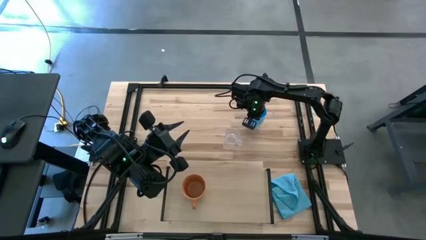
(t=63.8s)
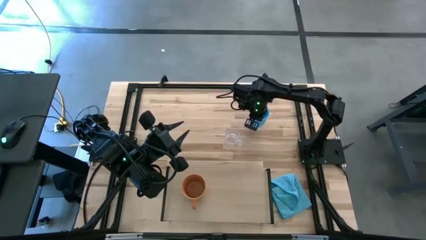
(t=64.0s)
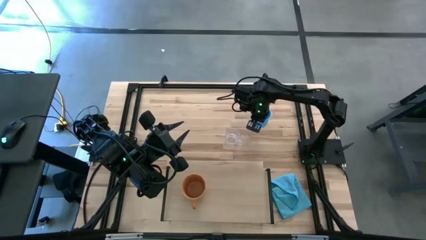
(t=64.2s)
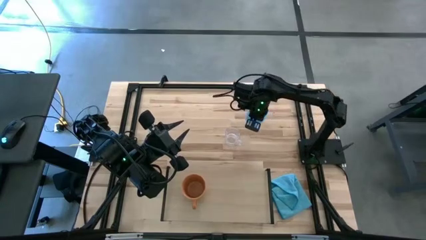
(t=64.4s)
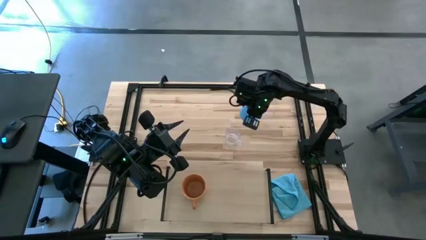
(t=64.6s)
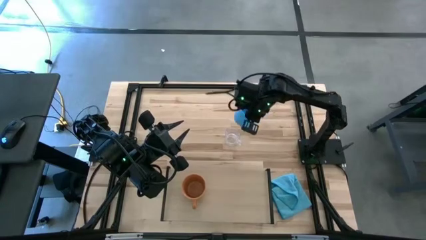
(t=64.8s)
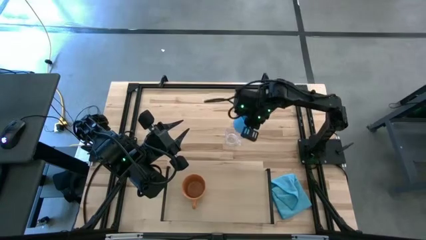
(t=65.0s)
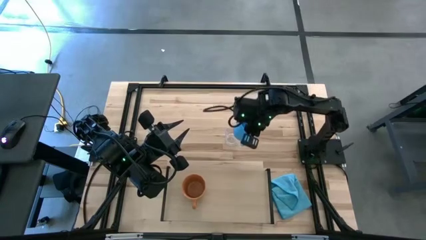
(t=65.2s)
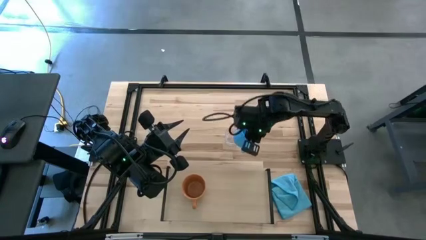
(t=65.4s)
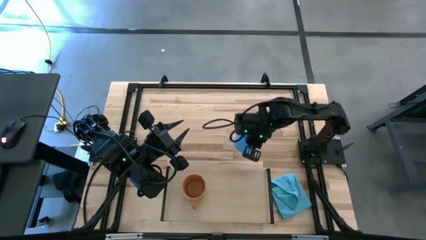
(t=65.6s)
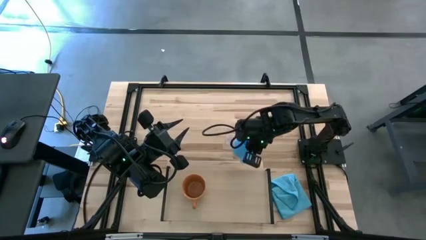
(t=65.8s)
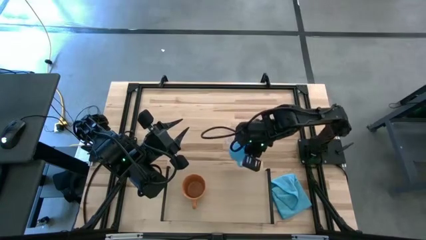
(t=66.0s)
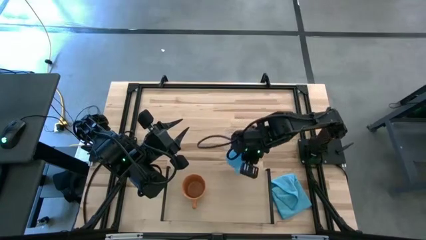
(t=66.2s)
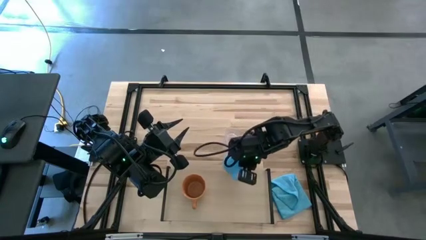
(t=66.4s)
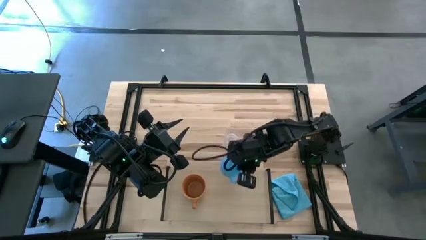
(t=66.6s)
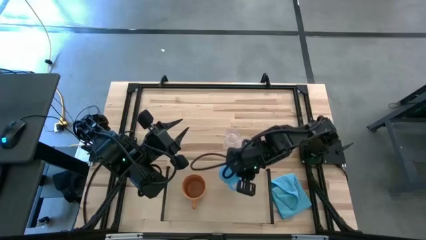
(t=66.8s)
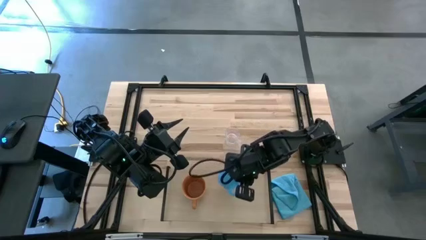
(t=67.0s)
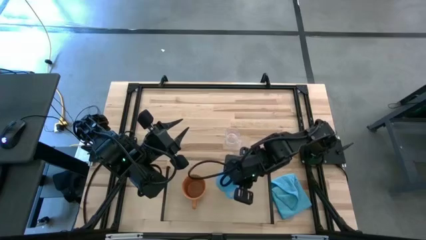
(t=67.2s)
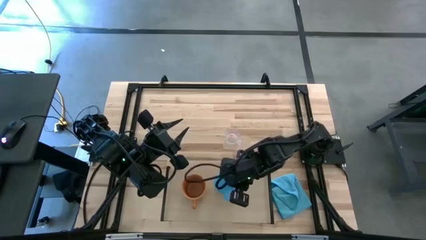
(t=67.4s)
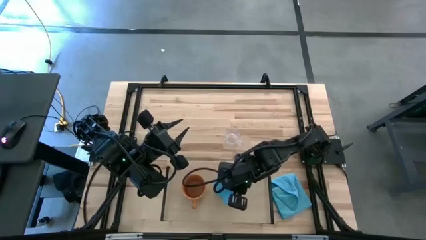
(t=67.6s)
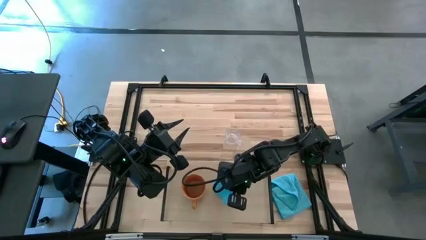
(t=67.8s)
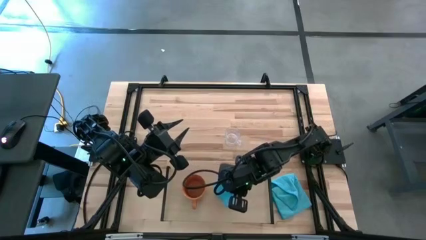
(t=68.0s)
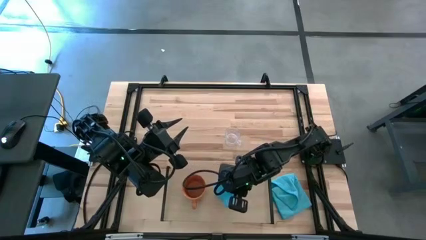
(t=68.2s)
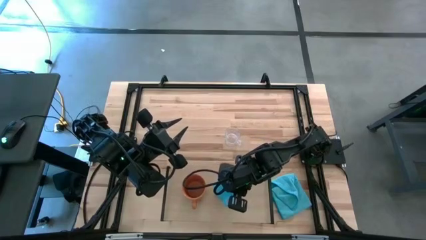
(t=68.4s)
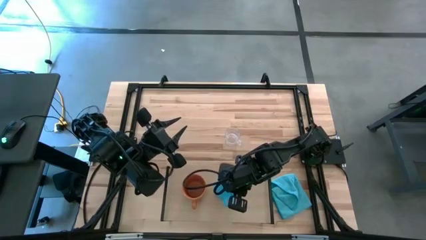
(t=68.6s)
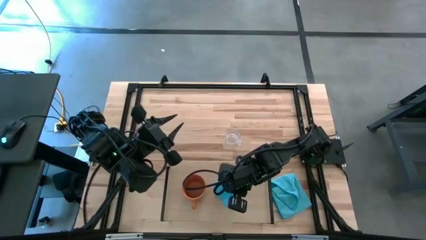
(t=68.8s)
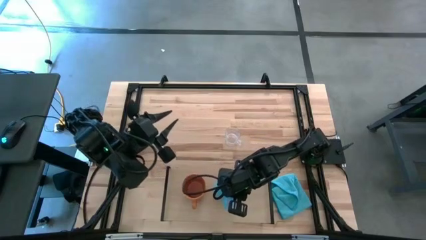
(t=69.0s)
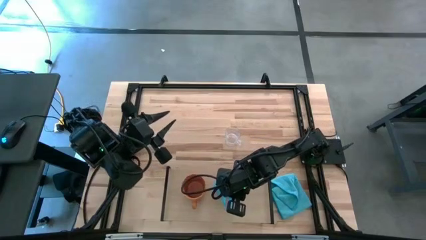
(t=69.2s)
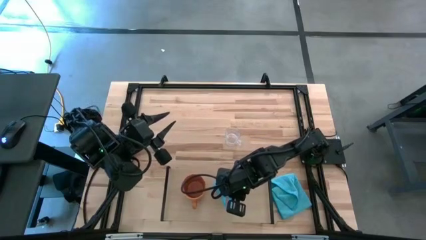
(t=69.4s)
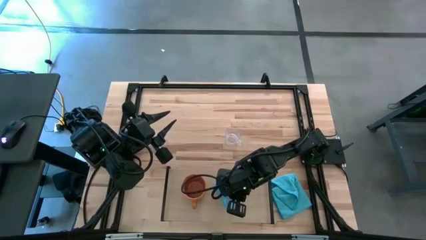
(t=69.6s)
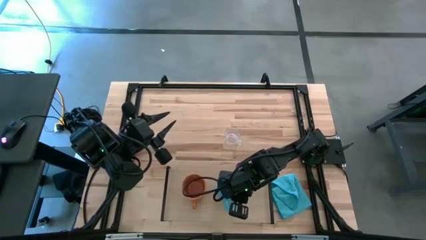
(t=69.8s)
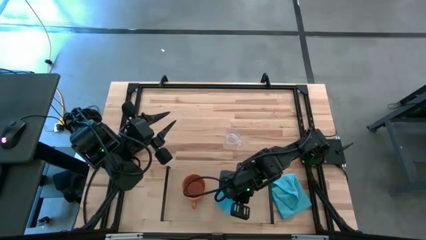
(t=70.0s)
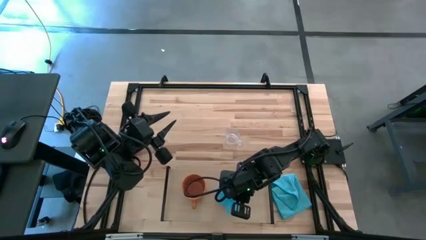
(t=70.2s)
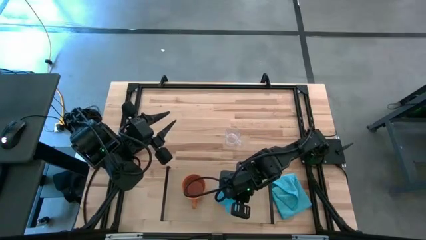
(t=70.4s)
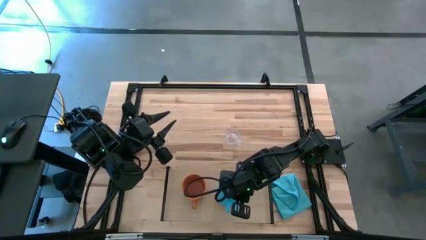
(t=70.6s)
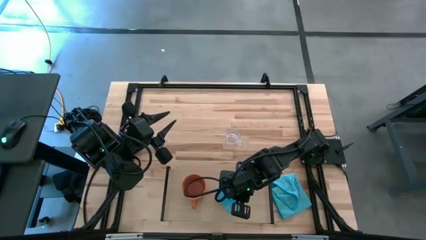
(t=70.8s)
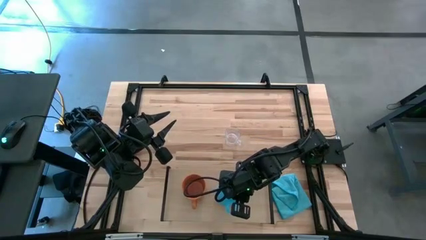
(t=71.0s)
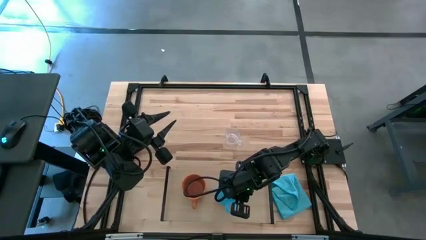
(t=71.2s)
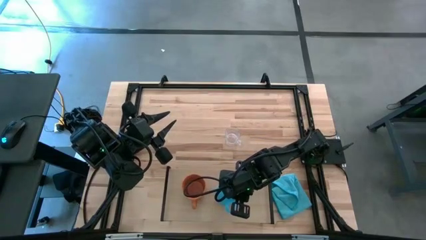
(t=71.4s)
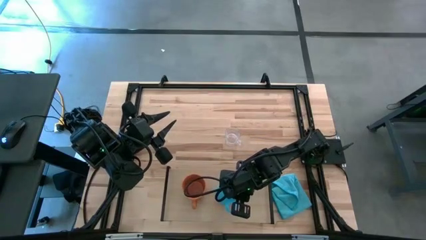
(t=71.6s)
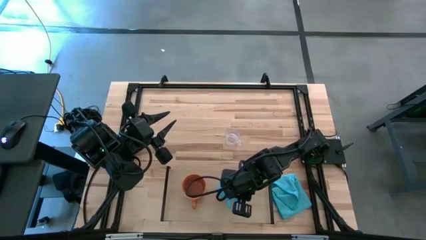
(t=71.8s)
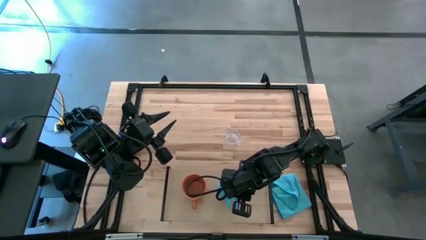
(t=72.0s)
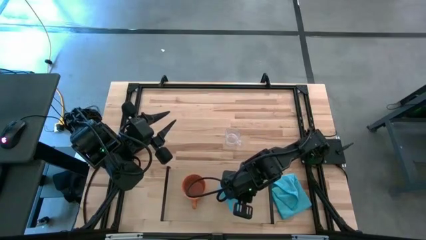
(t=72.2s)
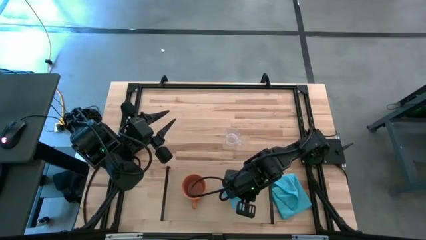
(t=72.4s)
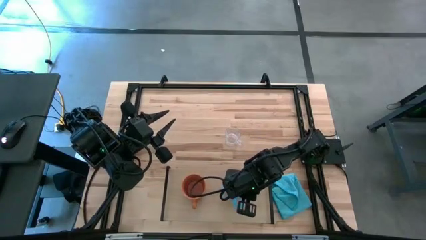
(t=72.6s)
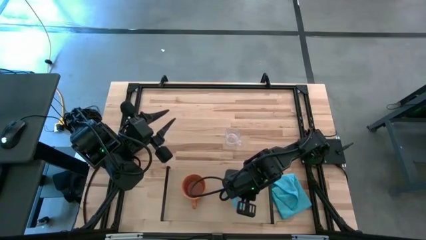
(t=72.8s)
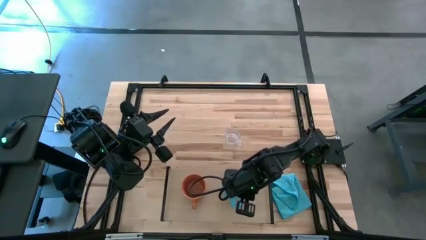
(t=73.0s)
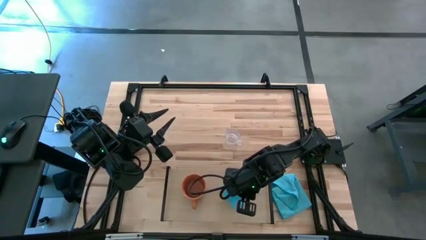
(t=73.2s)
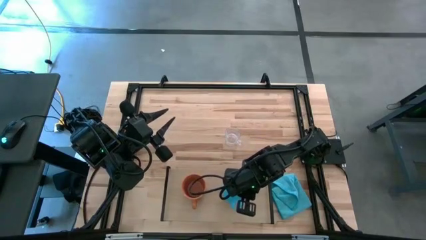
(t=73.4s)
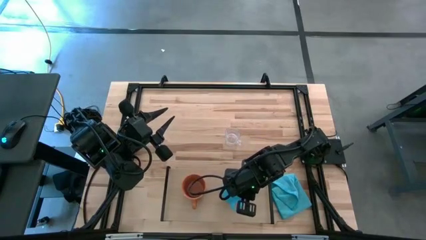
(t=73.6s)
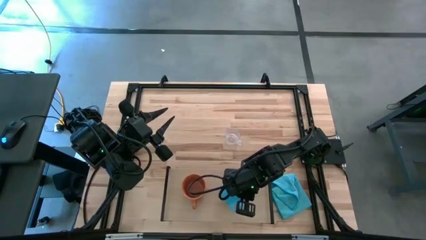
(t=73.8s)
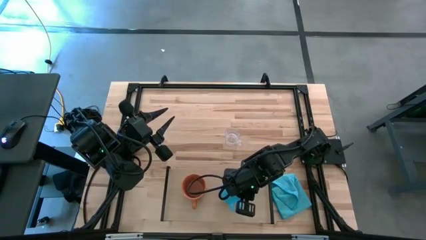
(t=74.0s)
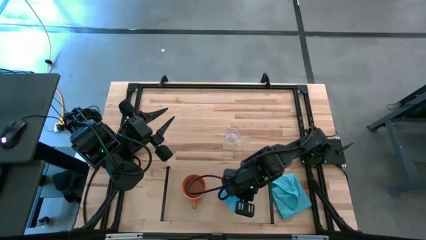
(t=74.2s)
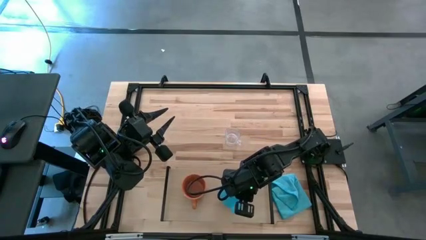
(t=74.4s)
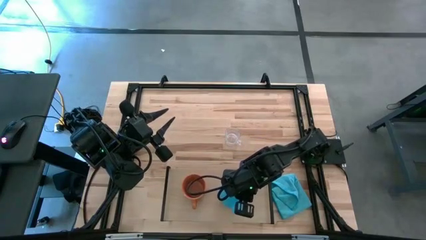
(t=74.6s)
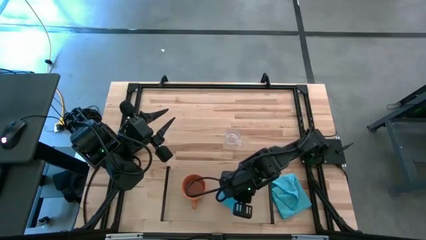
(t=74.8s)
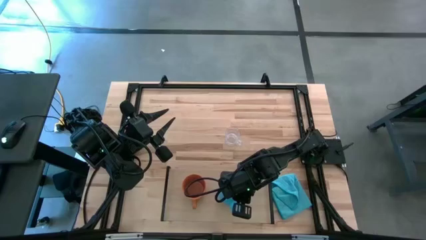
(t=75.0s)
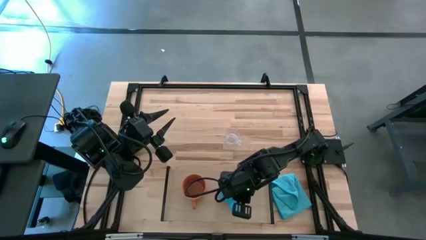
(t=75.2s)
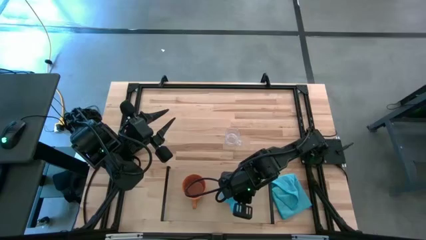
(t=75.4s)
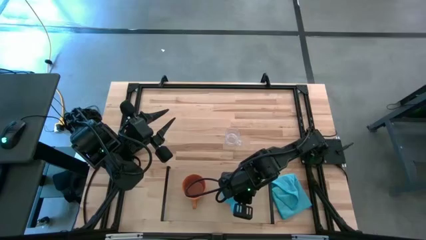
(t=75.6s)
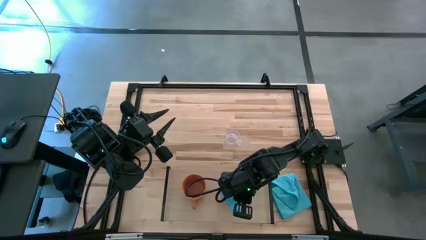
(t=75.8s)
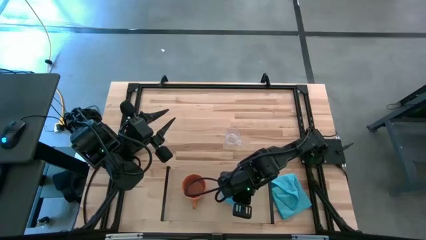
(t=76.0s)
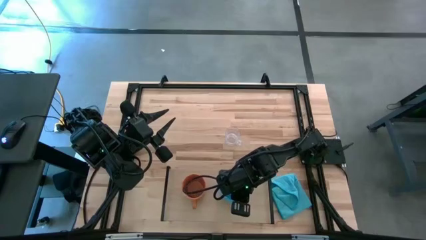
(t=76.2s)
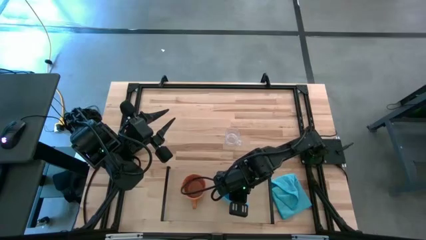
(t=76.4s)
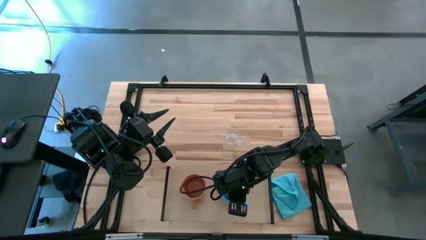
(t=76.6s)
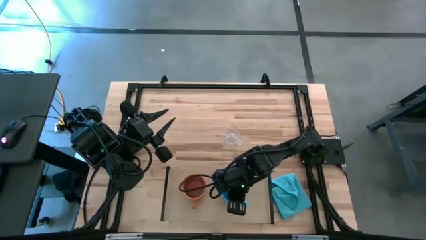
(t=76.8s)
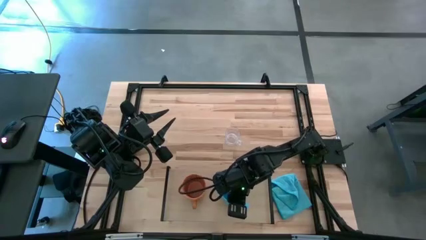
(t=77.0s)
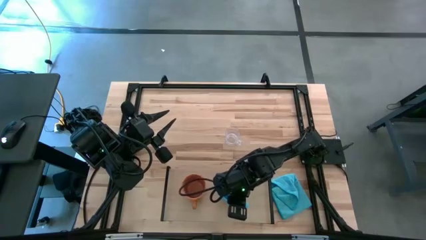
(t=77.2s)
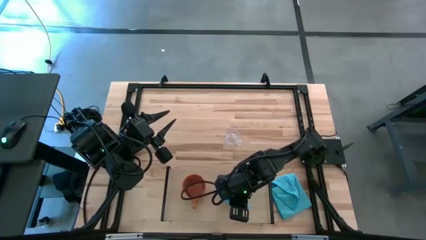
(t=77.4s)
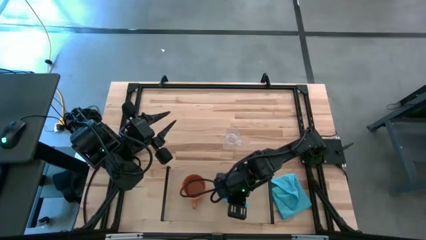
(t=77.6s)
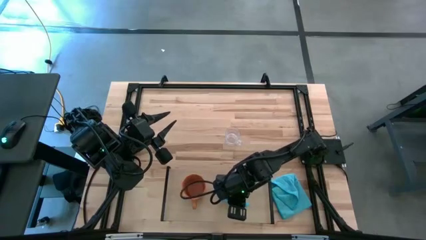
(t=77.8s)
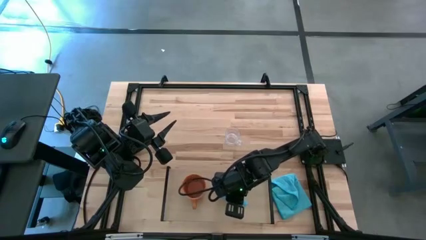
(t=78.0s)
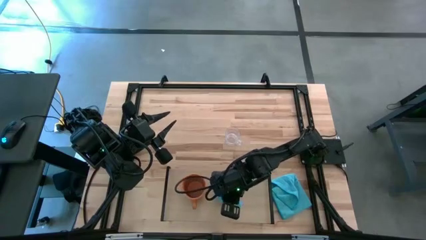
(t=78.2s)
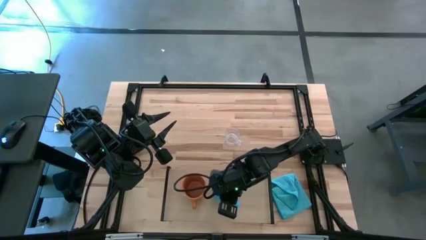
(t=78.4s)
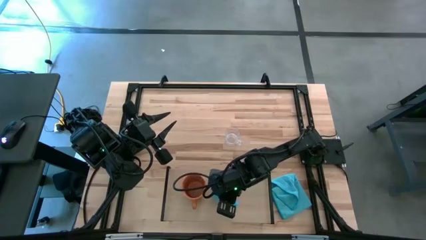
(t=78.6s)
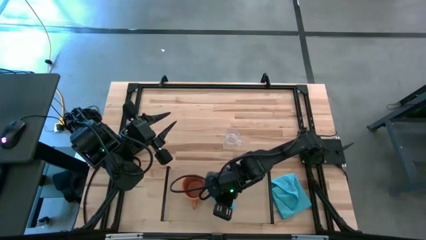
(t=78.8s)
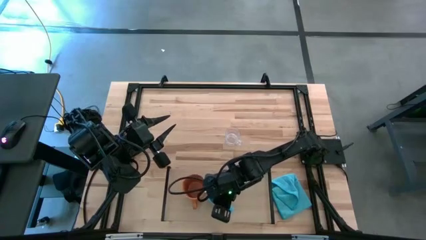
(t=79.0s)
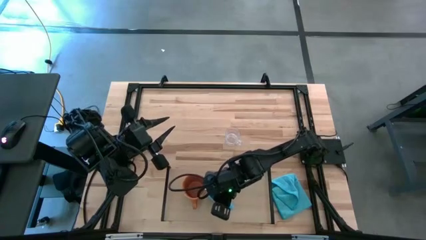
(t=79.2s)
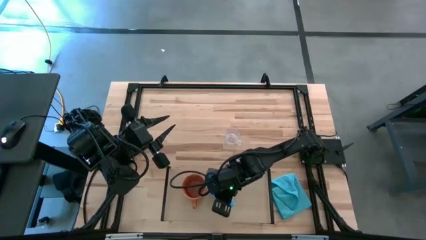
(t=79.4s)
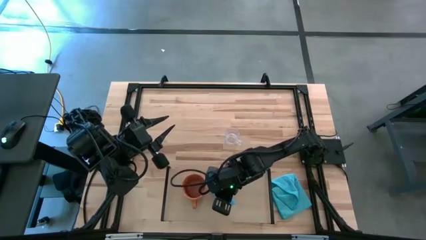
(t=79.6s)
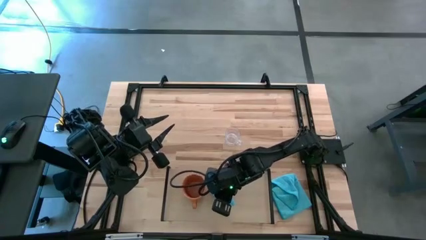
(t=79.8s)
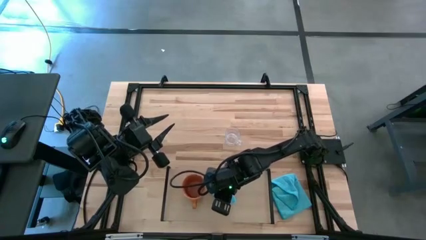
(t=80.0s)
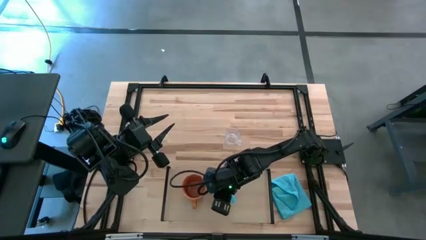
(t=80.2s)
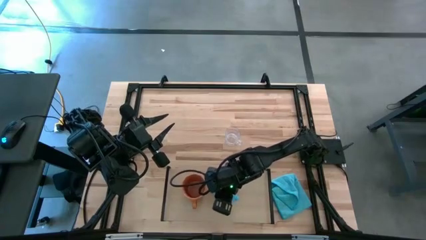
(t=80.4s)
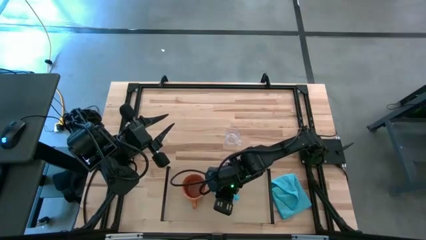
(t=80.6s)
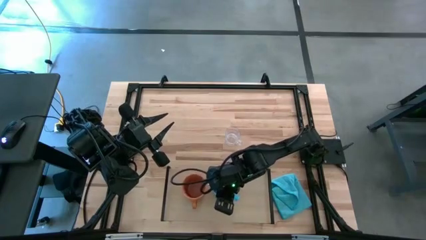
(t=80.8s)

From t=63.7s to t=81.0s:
Task: Stack small to large cups/mugs on shelf
Put the blue mug on the shelf
